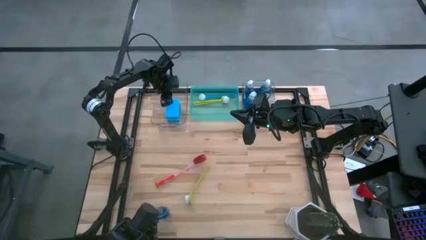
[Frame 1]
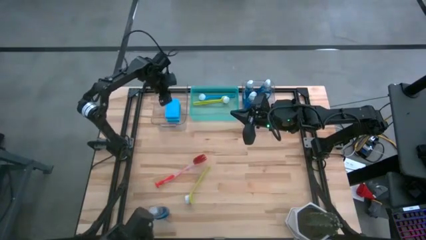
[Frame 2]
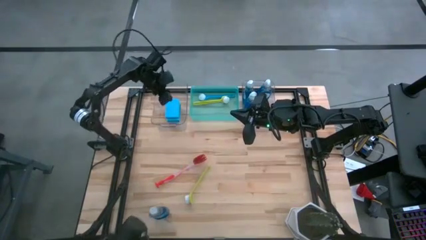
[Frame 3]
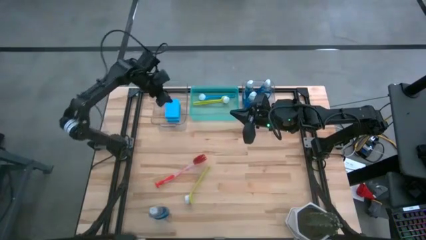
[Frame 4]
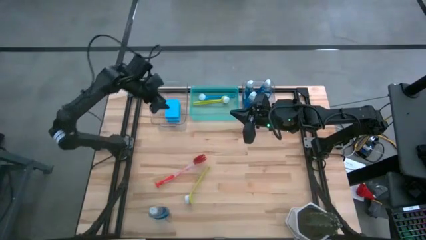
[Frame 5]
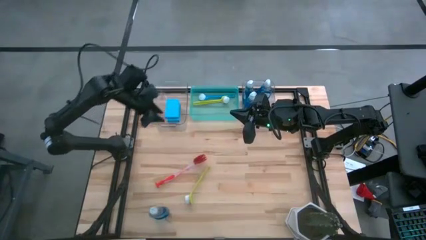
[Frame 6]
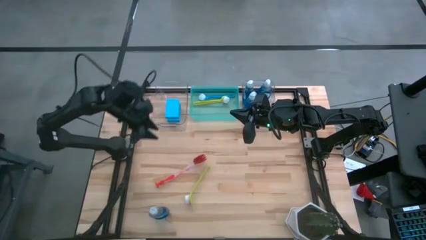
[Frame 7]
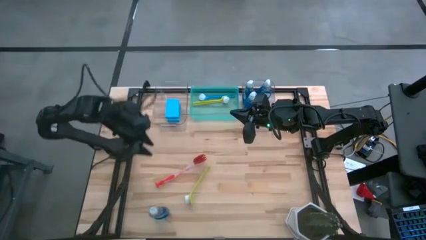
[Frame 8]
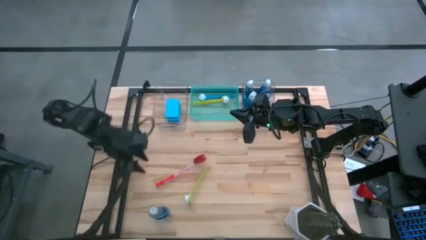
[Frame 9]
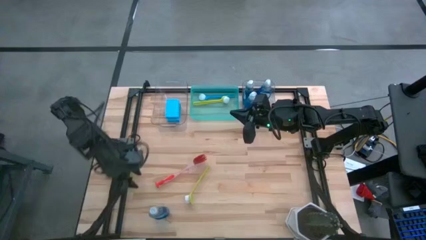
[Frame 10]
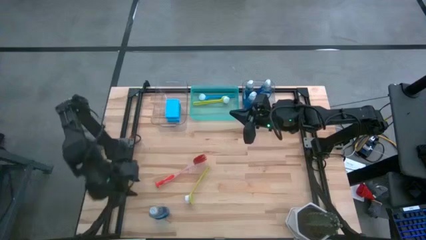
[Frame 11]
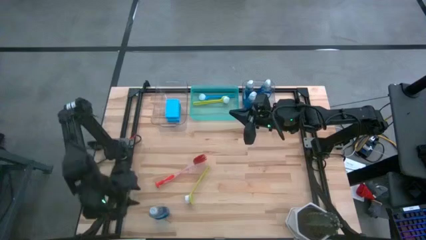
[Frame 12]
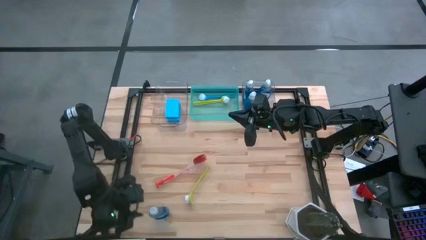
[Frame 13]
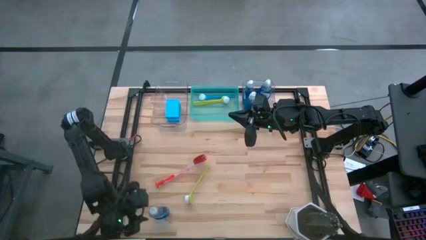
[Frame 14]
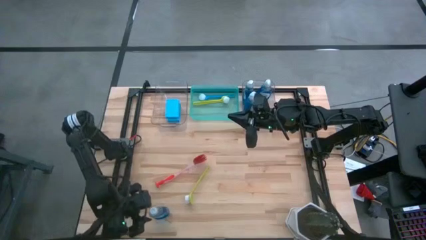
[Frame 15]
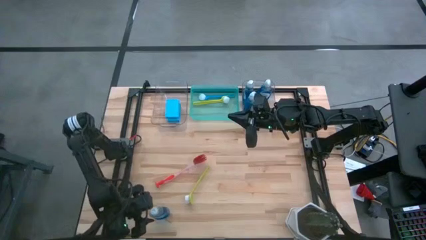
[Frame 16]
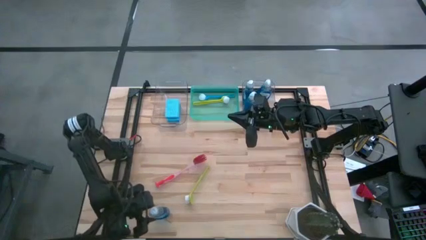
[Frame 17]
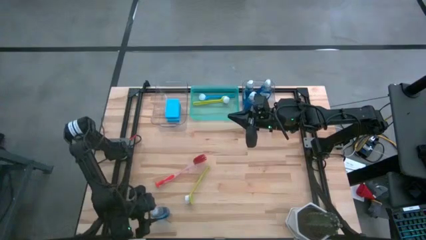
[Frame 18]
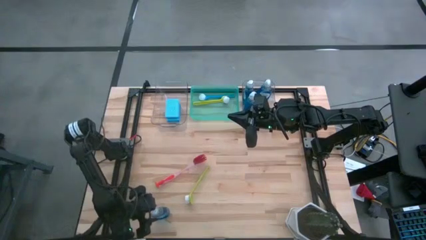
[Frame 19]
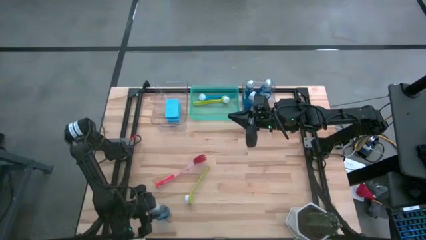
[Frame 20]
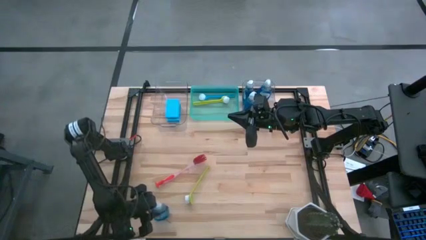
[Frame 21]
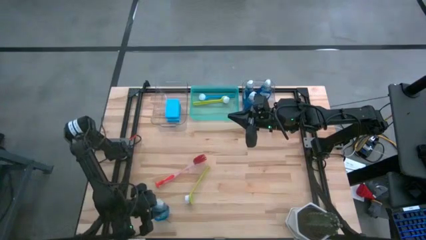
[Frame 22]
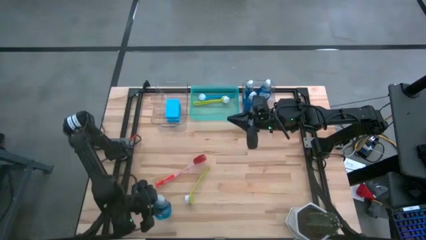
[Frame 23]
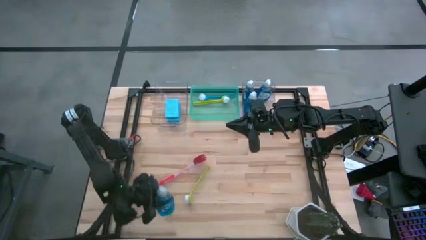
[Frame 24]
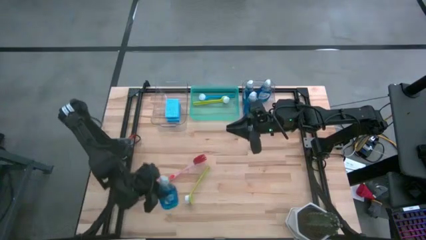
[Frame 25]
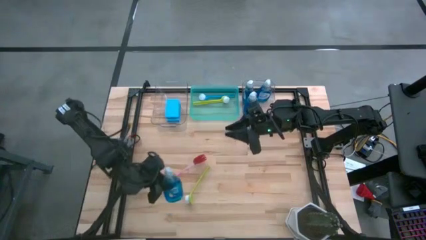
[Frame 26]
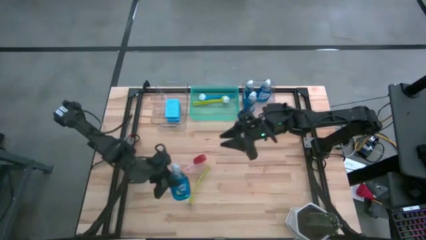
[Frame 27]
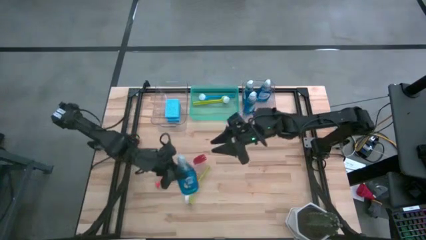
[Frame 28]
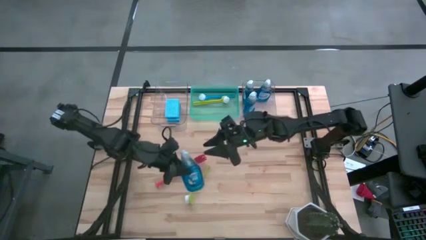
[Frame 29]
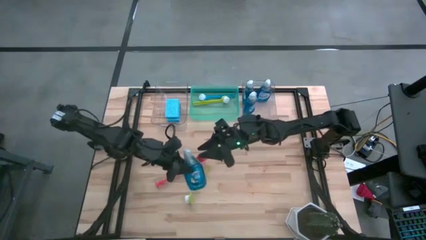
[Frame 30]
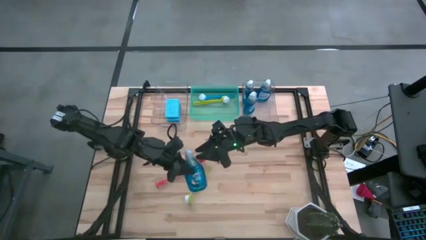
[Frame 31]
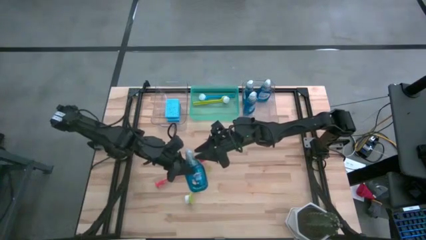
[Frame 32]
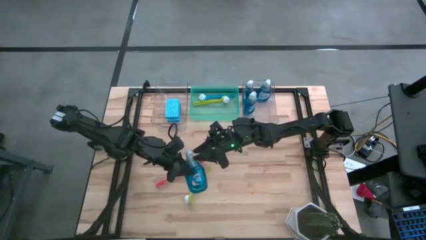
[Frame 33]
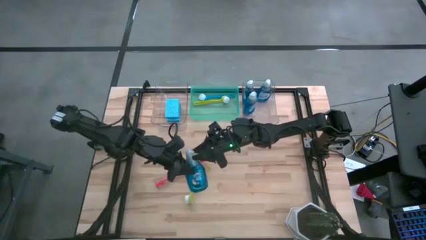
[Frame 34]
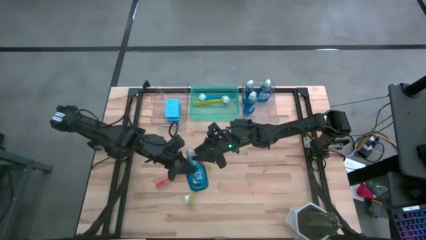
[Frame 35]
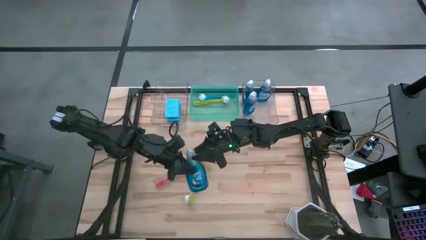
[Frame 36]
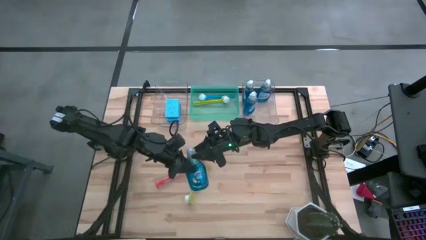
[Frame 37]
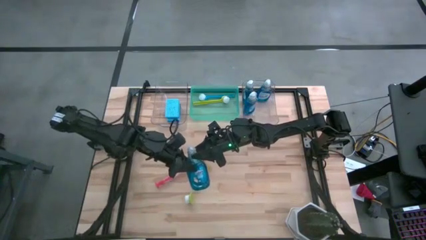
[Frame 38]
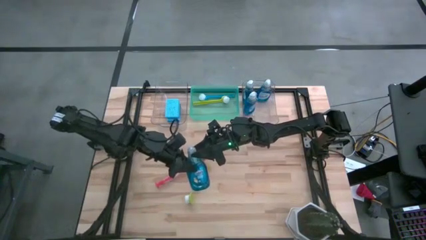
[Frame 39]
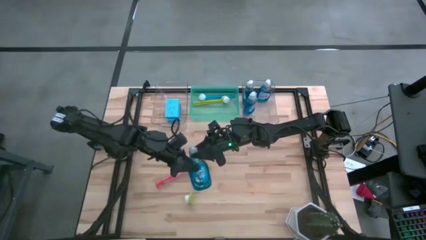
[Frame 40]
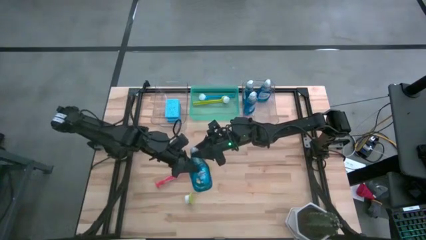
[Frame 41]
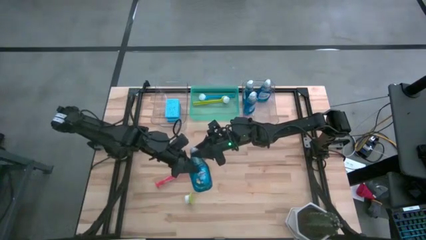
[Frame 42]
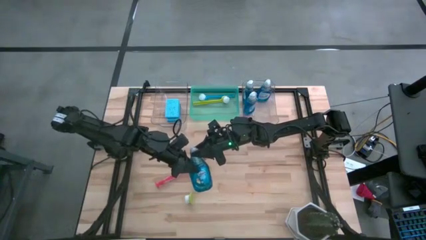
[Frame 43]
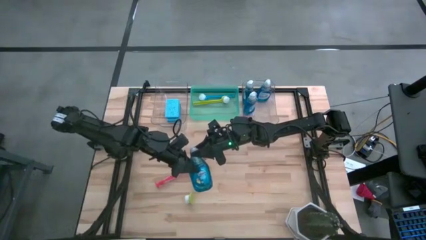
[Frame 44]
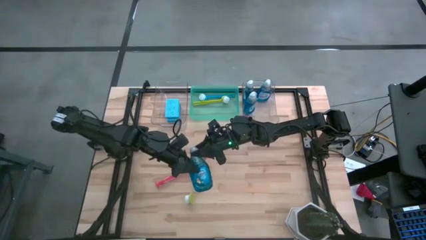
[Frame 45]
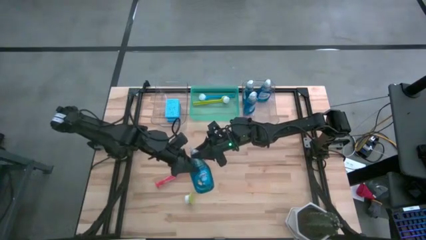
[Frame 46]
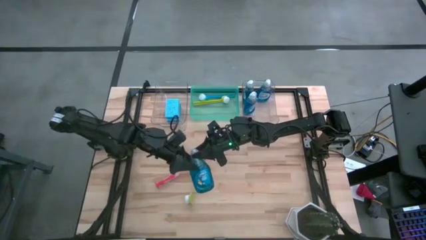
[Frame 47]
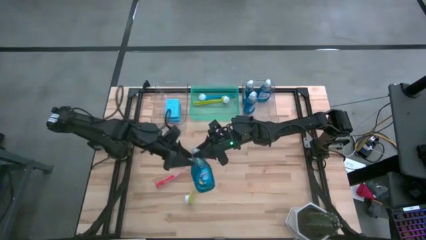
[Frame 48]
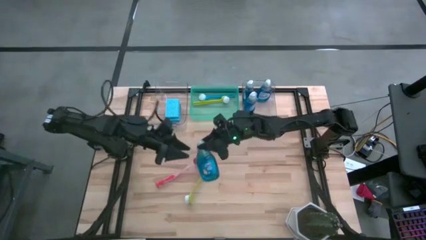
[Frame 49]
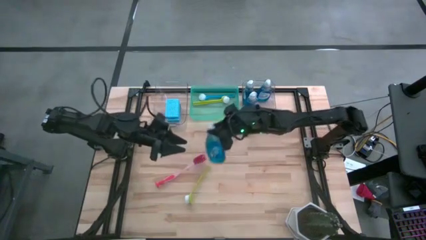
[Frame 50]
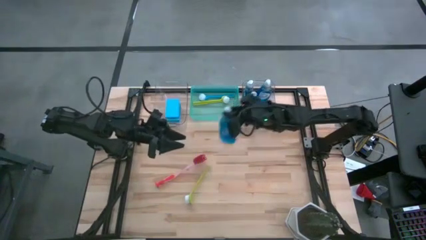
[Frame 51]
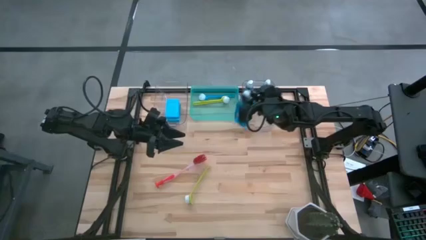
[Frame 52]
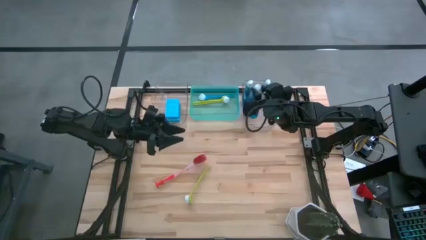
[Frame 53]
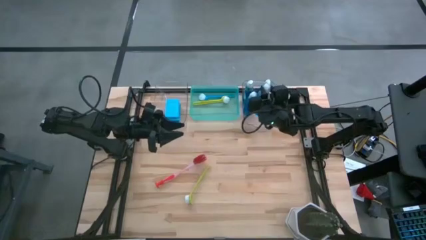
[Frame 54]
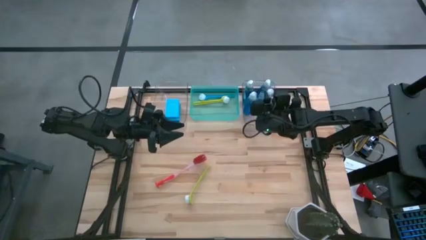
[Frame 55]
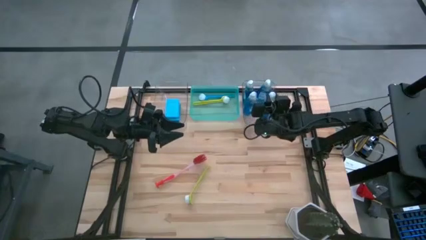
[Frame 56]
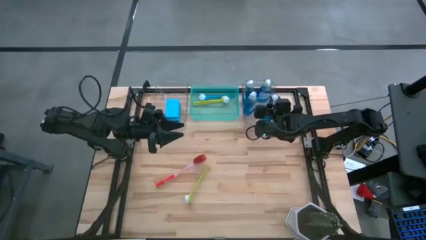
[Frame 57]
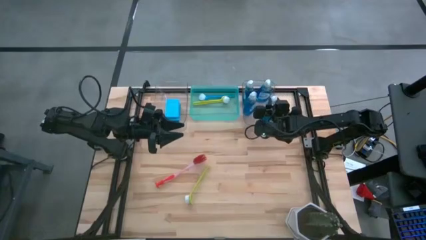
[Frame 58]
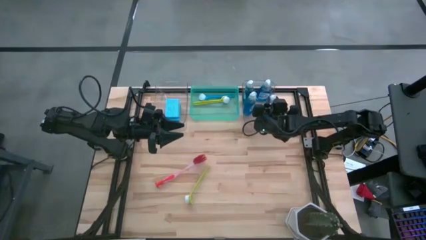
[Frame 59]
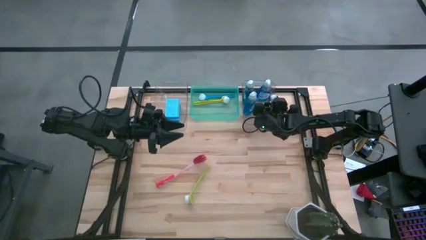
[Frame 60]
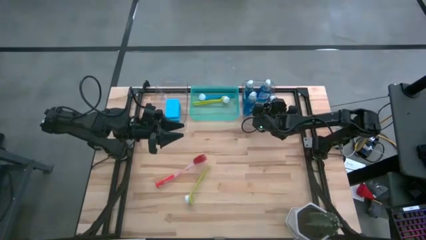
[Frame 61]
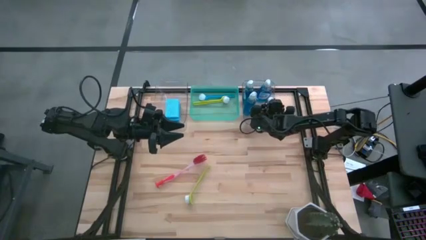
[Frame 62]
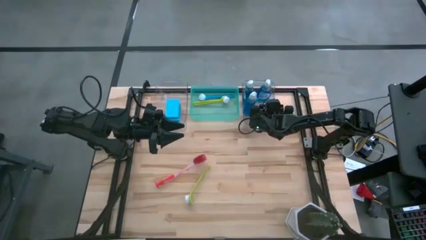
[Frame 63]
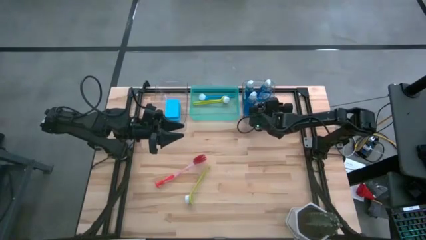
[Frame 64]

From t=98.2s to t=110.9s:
Task: Pick & Place Kitchen Sink Supplies
Put the blue dishwashing liquid bottle into the right transparent bin

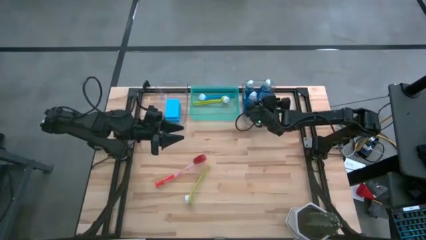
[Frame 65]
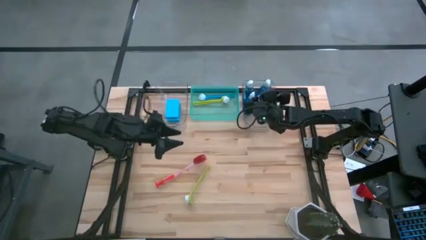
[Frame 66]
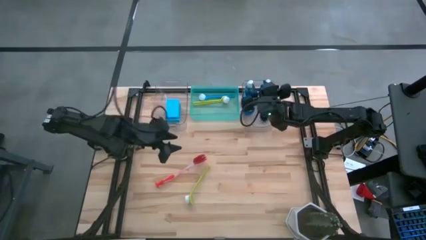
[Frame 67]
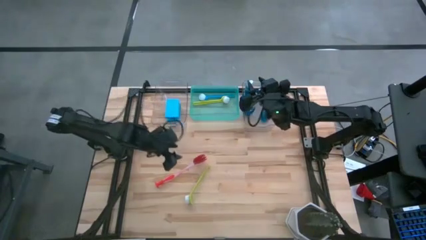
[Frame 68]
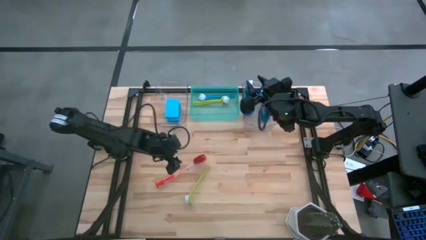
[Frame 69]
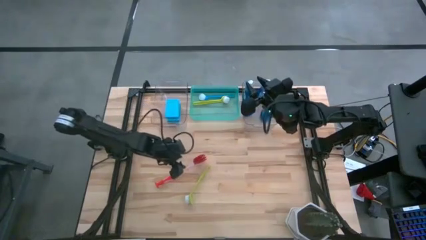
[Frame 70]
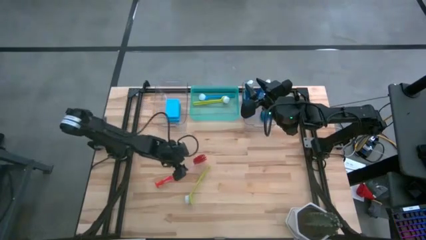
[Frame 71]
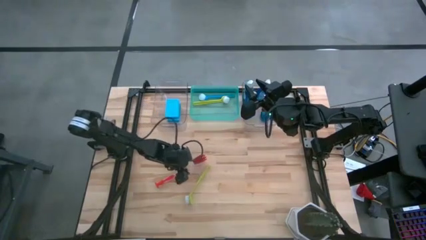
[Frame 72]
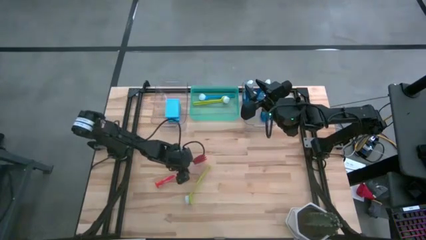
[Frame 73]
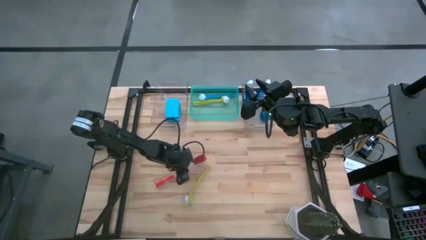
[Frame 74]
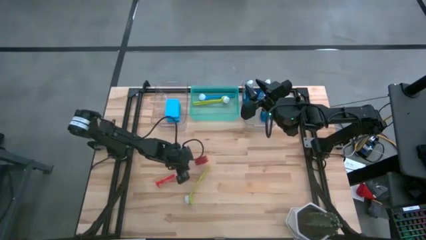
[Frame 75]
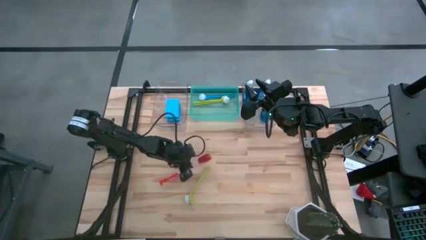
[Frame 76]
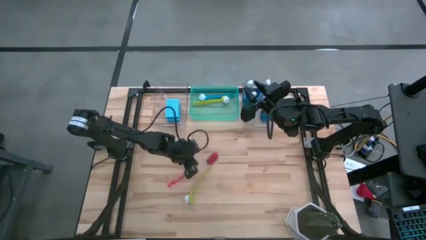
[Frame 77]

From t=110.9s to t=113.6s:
Put the orange dishwashing brush into the green bin

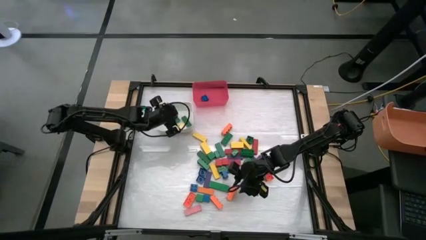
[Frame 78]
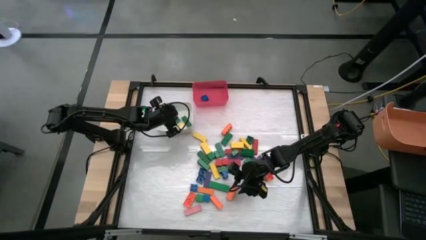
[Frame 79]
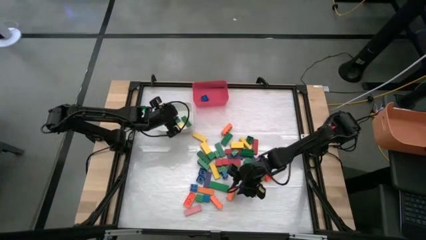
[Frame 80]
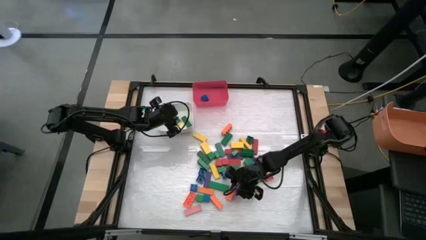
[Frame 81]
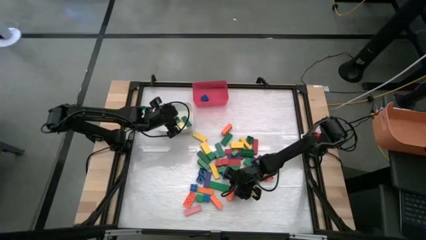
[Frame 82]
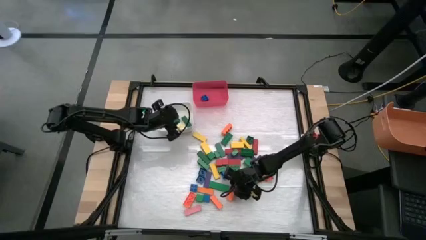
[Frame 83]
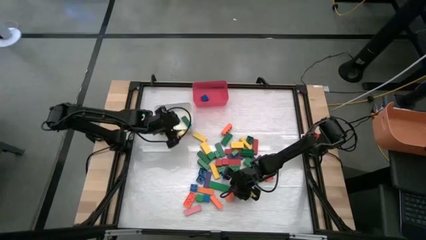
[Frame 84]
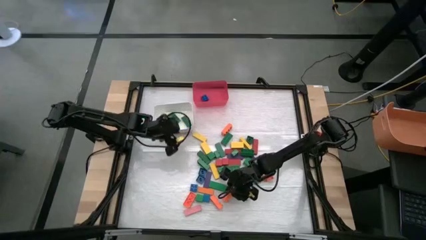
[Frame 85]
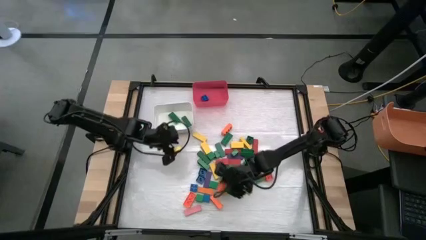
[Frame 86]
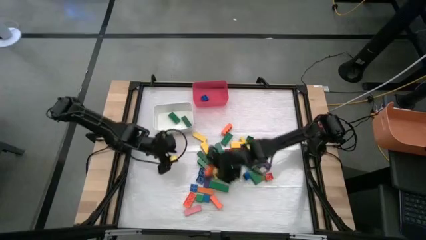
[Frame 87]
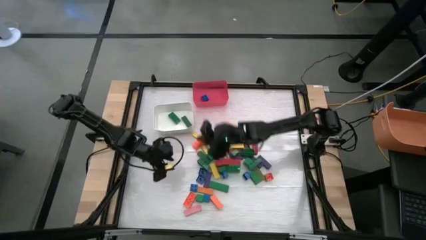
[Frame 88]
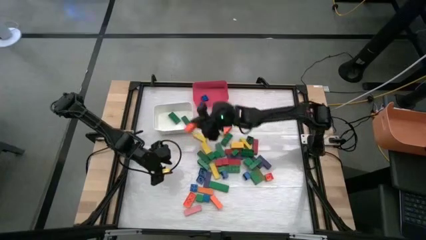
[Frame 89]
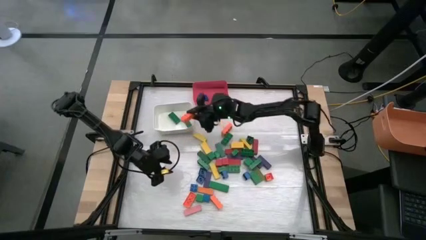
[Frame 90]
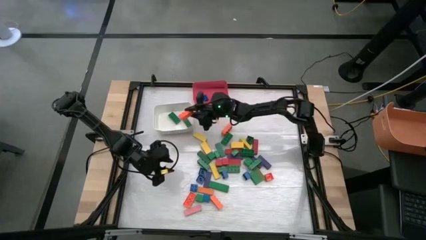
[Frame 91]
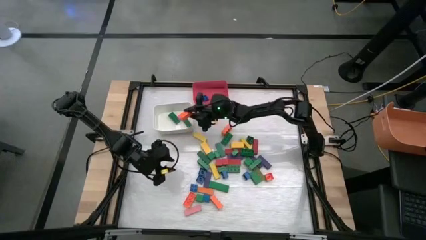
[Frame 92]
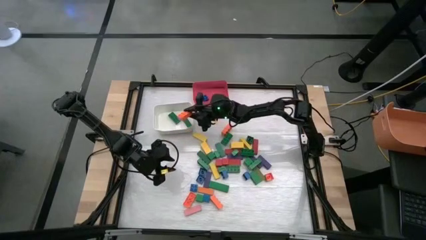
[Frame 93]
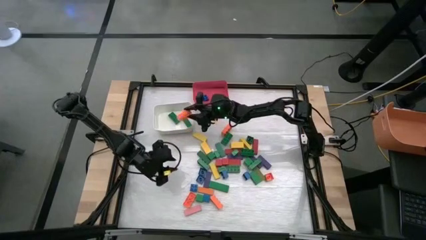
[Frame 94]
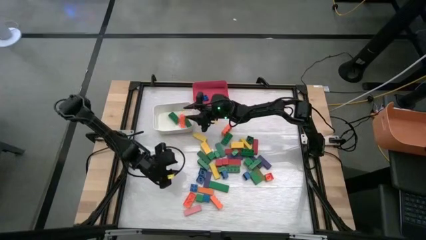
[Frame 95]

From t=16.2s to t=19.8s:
Task: Sort blocks by size
Put the large orange game piece into the white bin
